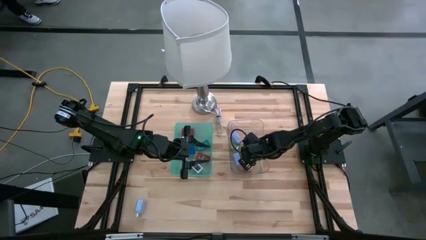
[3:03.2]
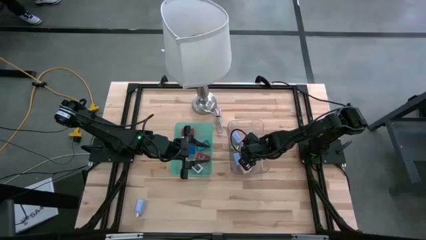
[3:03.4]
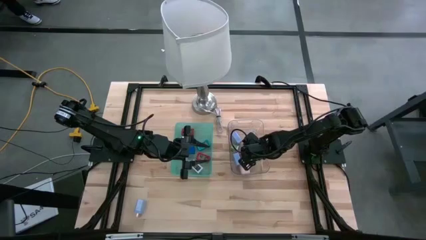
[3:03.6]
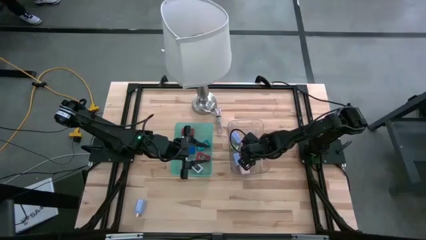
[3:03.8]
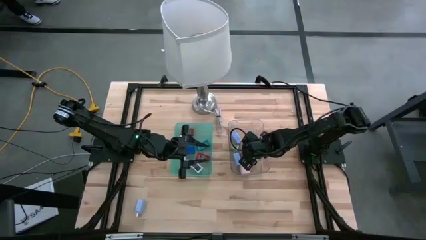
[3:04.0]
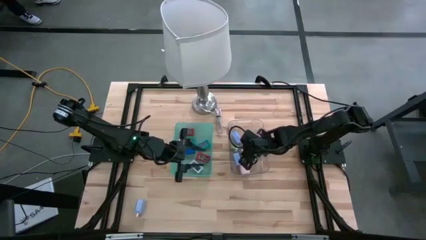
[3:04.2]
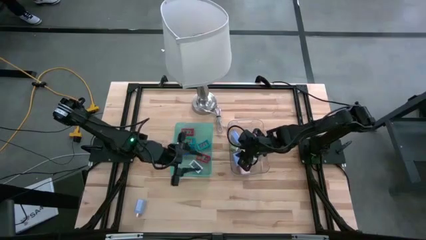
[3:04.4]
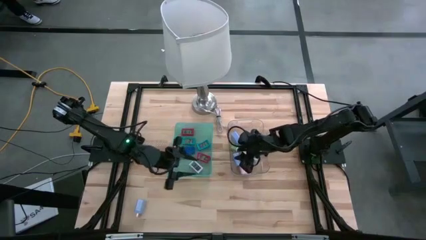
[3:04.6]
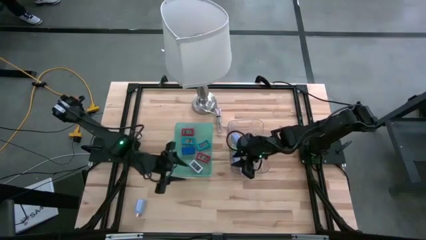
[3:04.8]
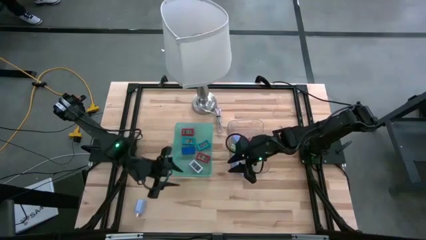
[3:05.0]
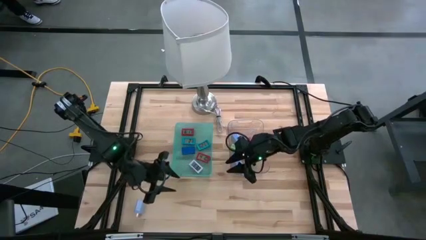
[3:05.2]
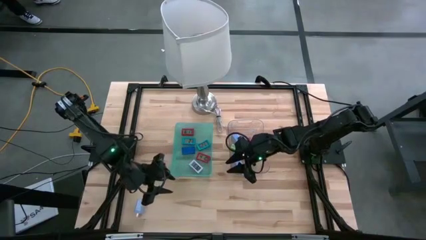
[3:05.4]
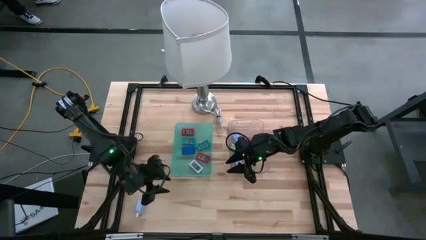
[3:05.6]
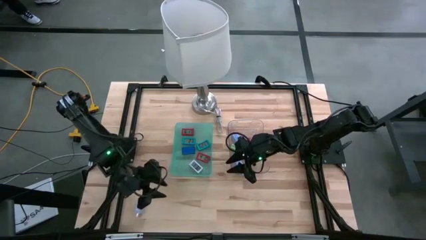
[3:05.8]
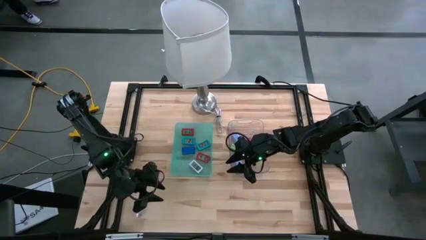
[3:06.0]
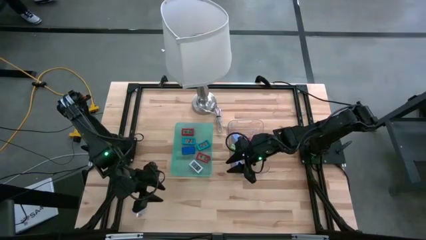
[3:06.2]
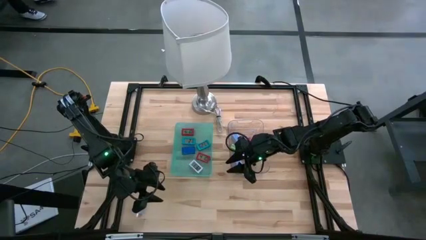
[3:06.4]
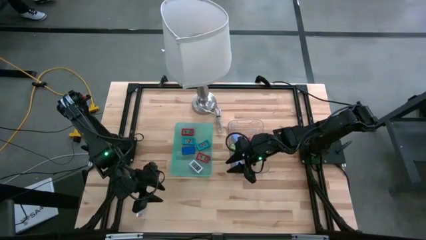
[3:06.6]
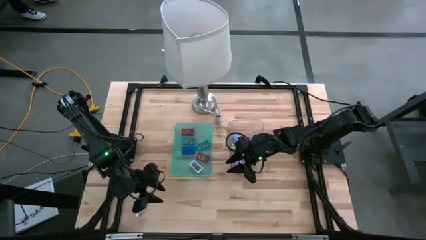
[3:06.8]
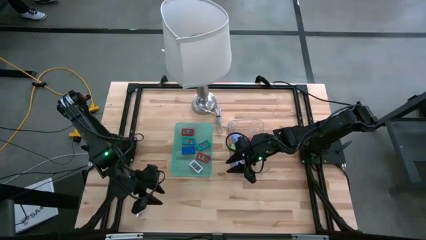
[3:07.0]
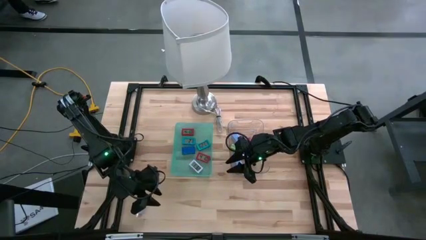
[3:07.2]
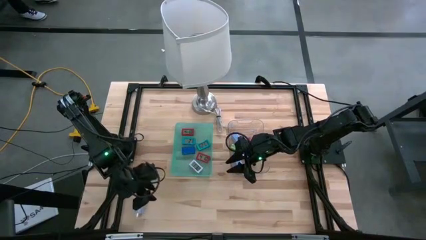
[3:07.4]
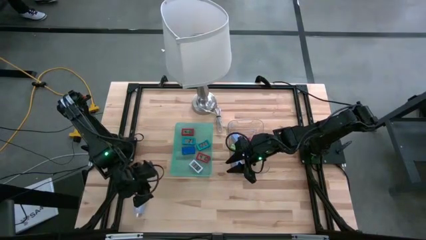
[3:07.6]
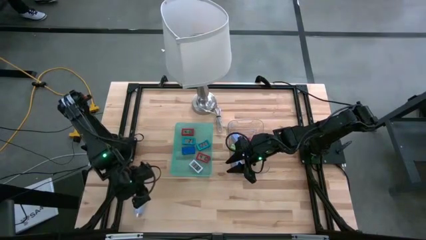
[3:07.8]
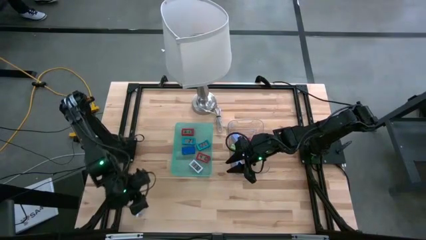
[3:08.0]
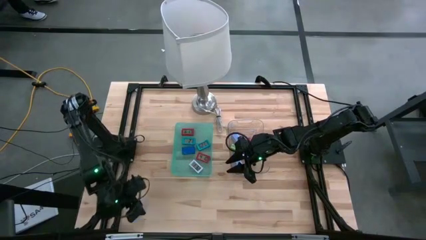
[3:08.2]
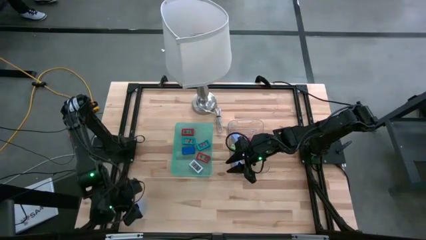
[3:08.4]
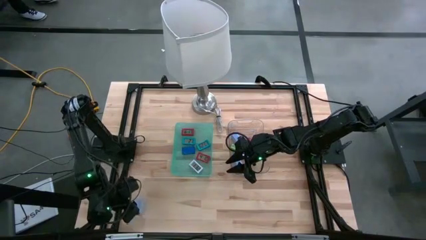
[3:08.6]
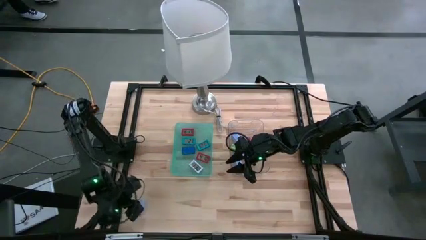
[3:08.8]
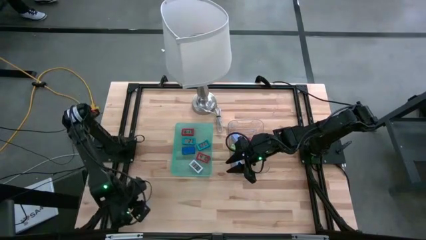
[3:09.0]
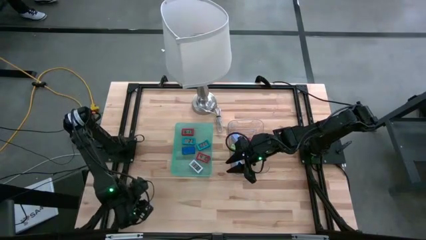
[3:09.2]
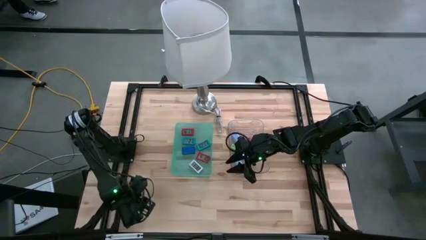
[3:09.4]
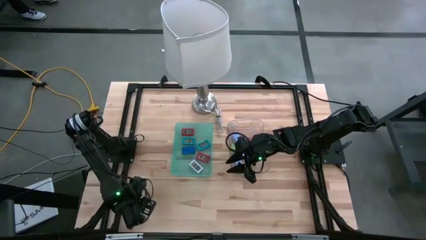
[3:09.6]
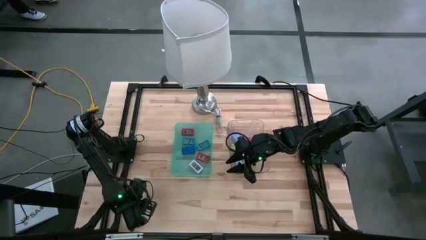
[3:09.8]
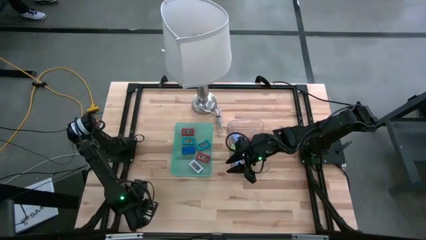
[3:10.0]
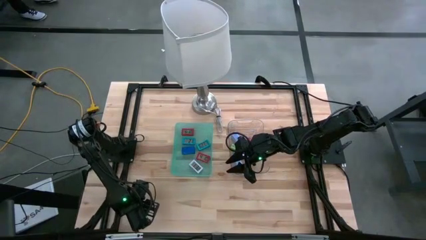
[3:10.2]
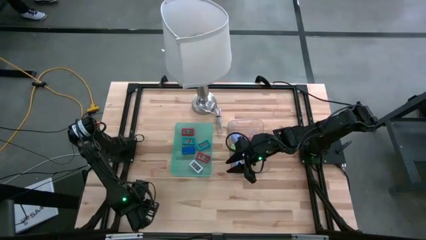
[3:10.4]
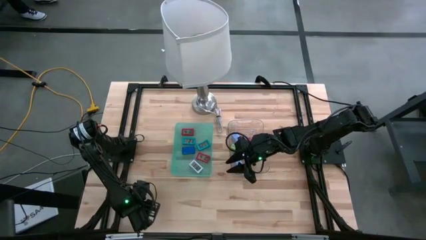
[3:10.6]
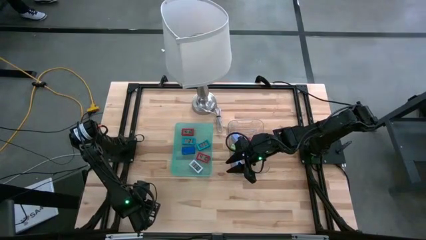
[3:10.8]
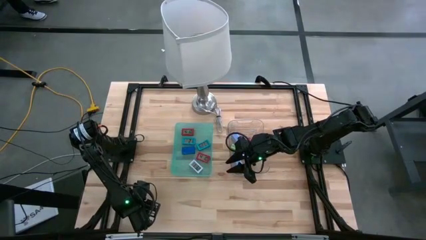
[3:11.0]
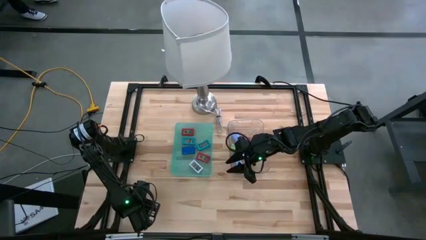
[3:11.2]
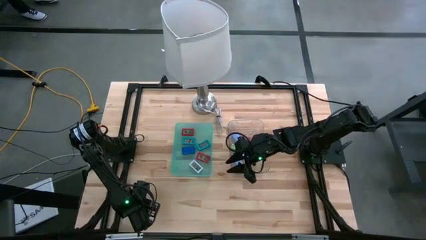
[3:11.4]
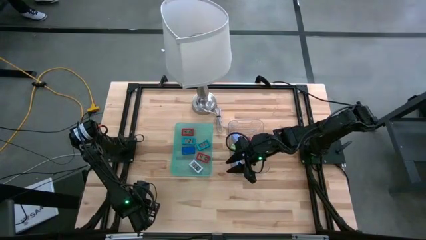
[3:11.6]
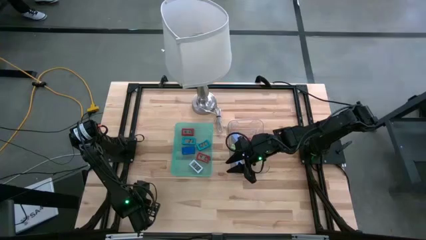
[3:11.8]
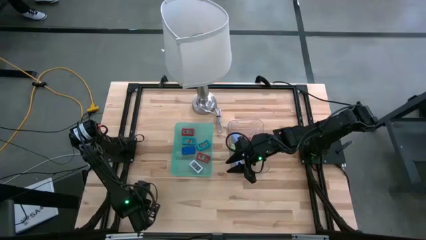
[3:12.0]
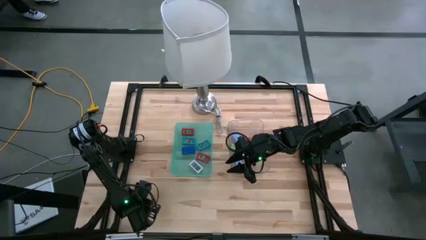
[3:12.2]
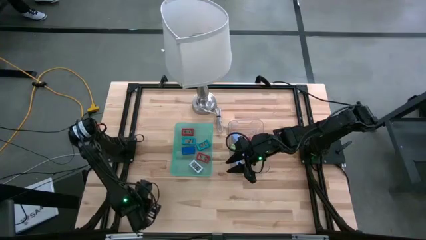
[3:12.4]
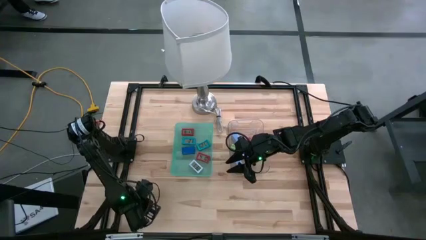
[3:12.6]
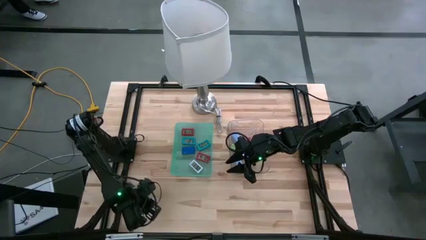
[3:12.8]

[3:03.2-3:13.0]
Task: Pick & Place Office items
Put the violet charger adapter into the transparent bin

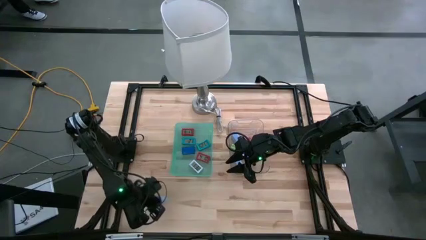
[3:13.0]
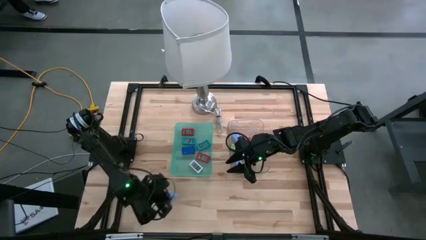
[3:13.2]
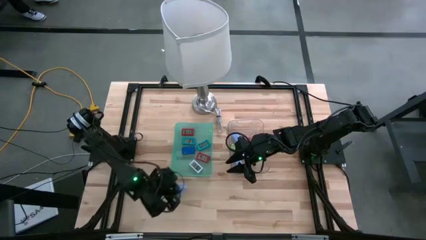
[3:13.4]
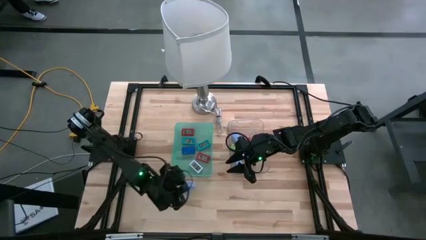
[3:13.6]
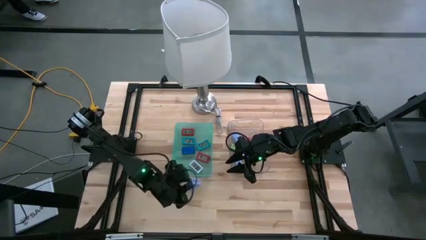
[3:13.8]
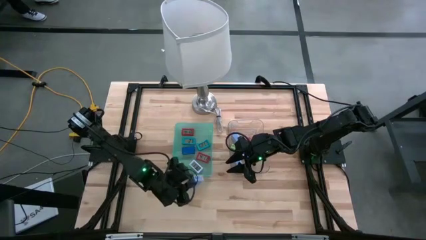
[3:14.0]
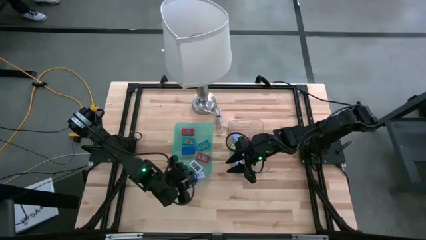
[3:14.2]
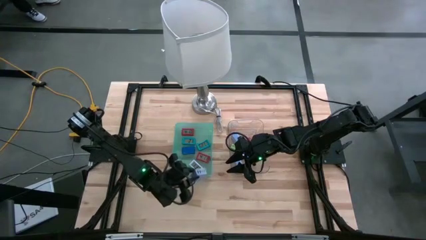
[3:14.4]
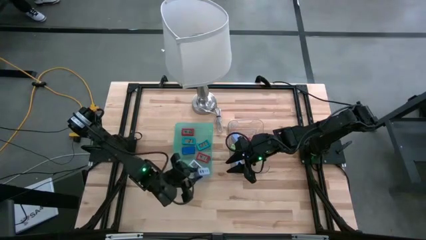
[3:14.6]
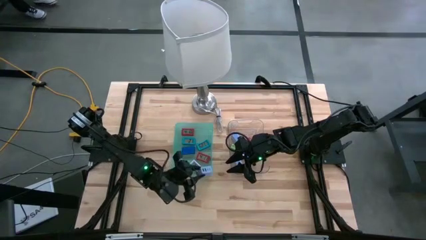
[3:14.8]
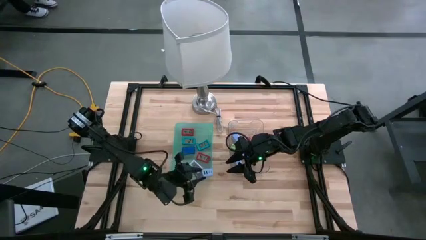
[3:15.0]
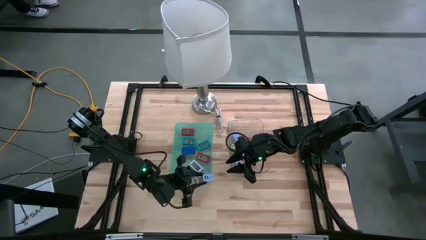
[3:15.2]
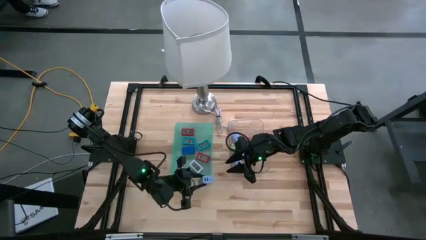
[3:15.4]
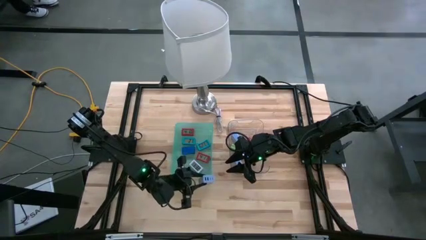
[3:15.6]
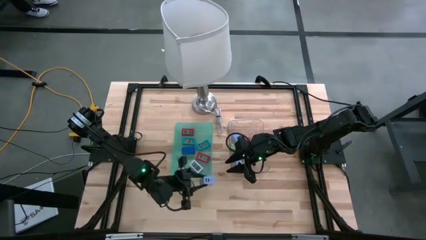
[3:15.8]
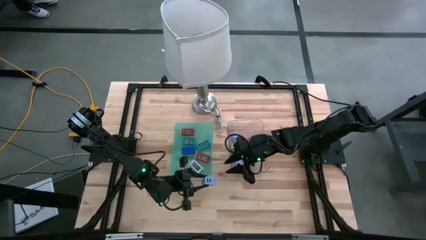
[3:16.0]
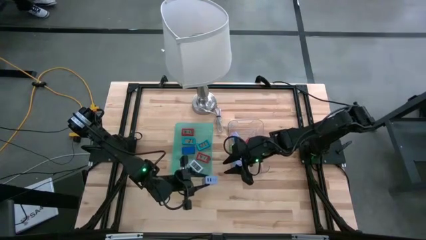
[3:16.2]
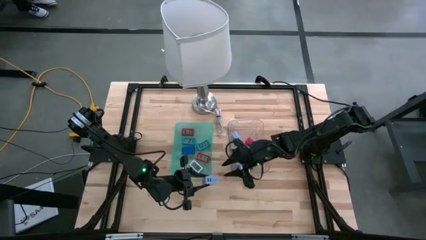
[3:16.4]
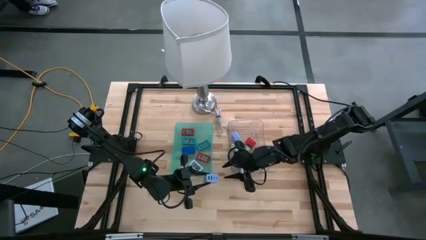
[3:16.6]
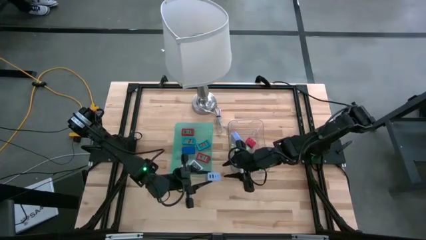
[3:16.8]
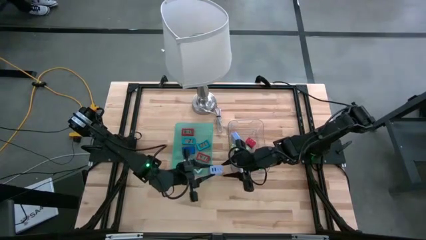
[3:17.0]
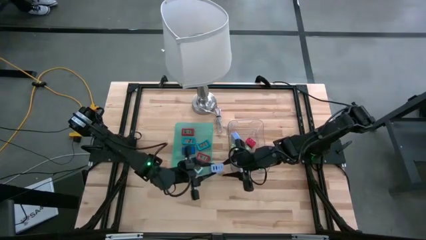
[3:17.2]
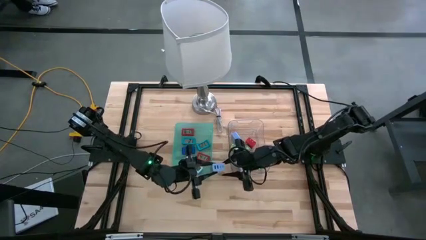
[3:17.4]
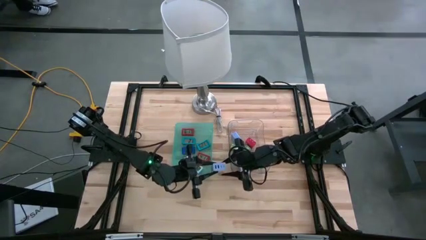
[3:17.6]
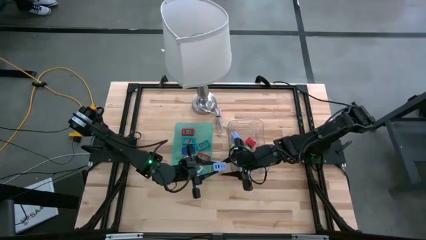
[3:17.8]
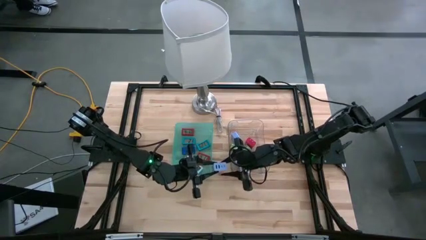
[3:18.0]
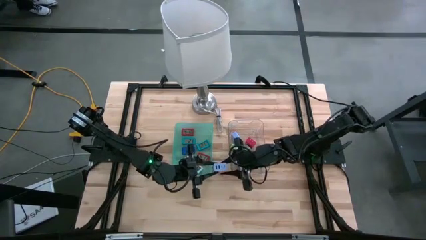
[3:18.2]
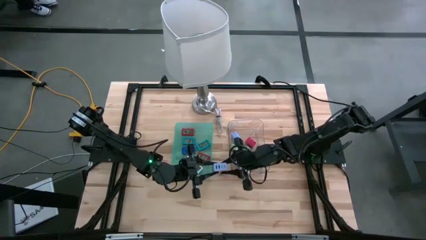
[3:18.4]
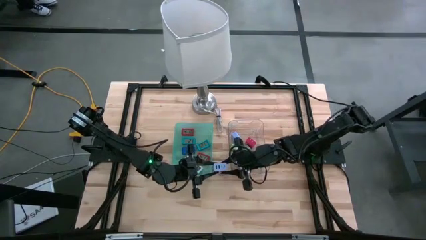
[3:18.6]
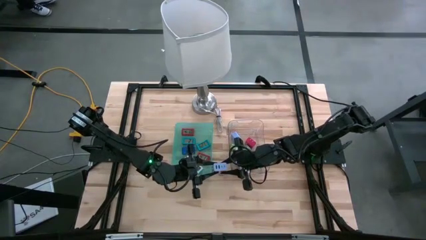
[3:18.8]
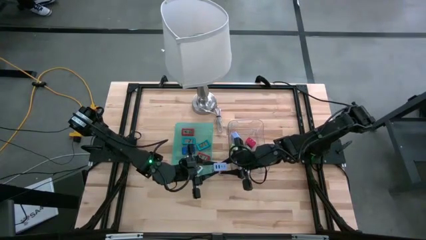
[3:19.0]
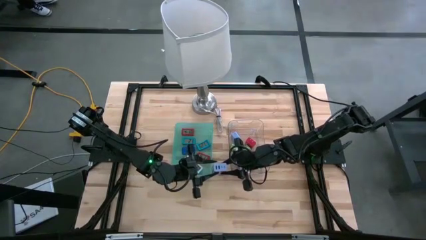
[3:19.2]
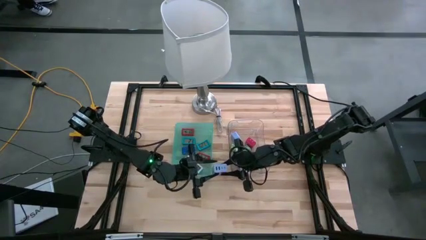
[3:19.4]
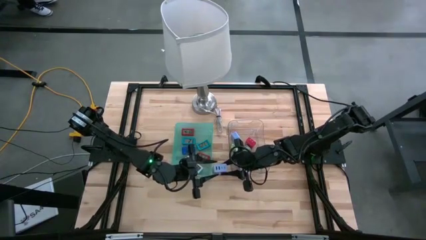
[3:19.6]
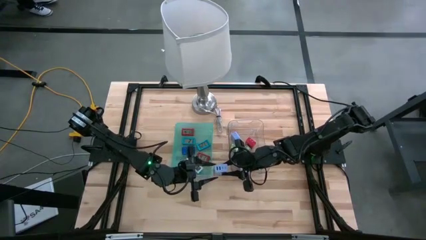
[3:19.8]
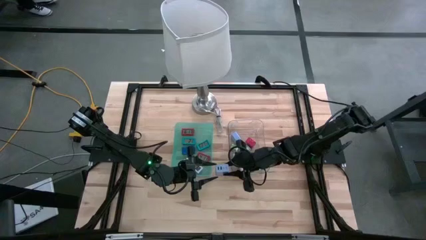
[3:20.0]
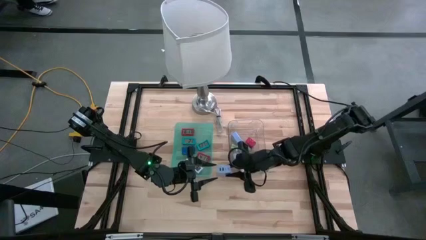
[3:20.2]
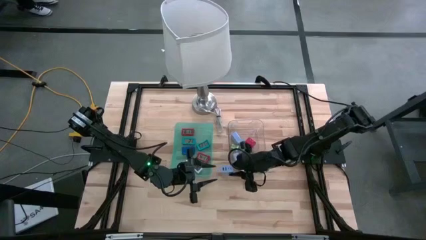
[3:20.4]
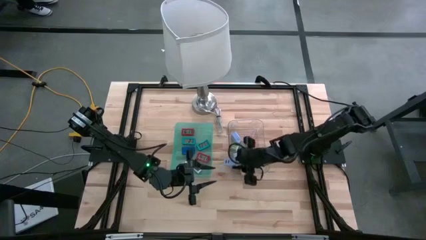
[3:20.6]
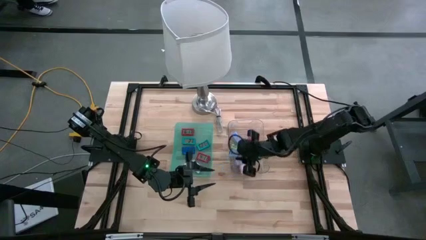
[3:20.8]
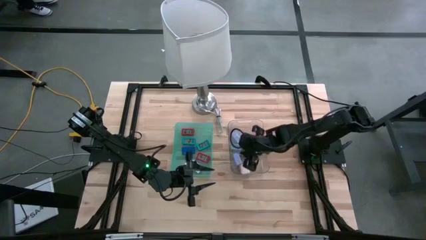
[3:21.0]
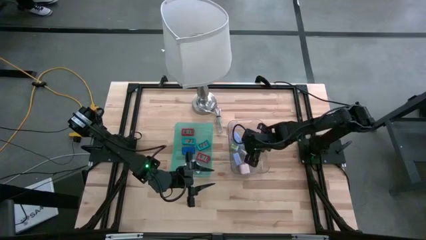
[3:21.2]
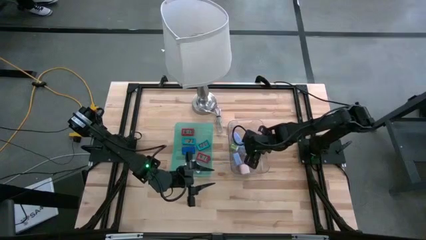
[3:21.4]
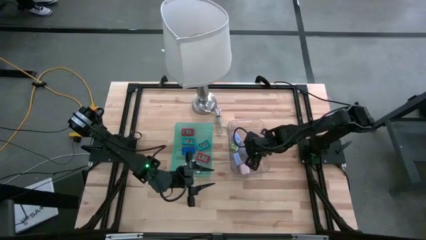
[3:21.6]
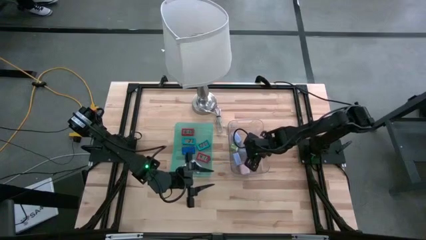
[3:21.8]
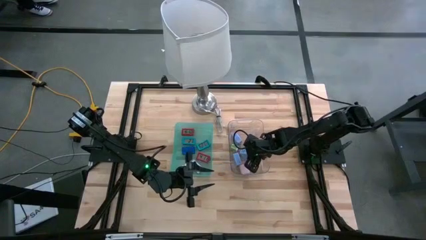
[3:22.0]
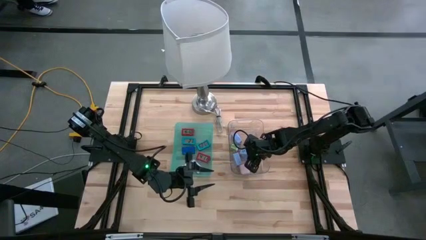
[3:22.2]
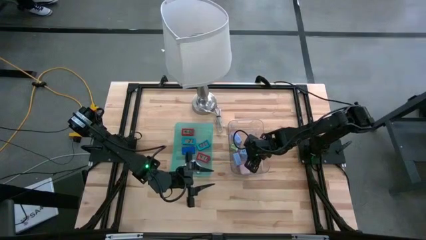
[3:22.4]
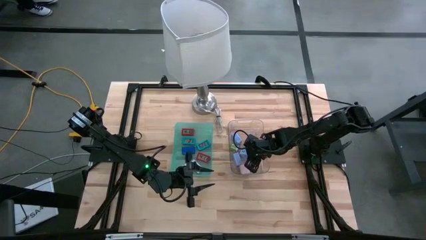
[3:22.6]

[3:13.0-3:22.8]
Put the violet charger adapter into the transparent bin
